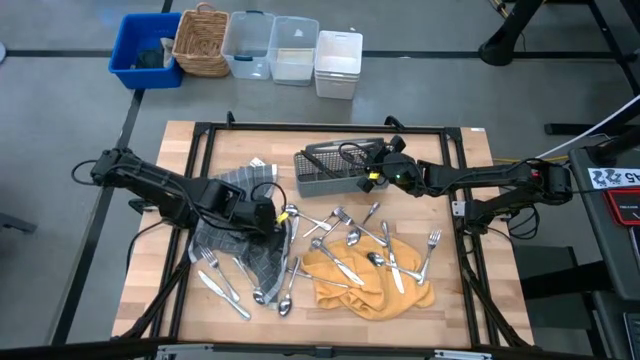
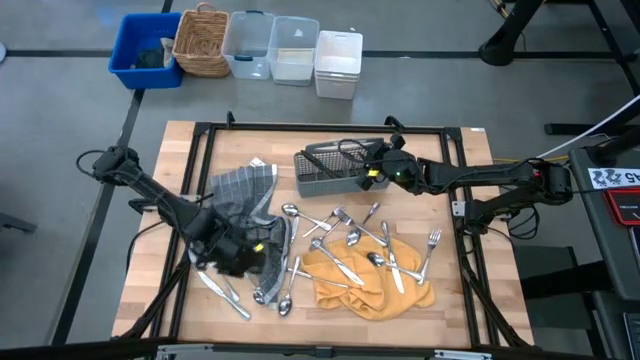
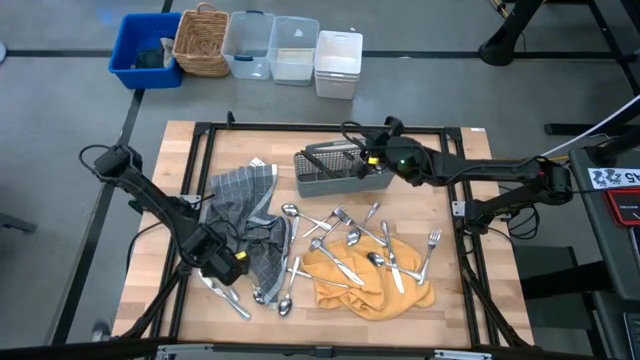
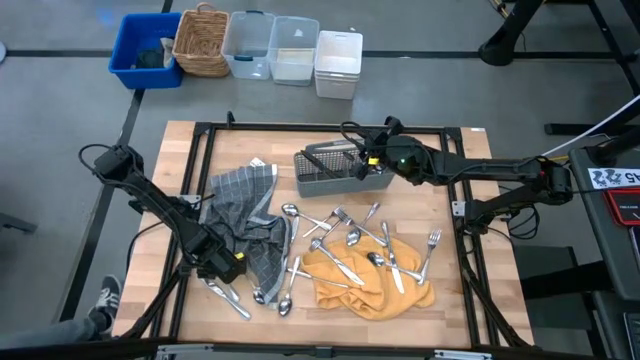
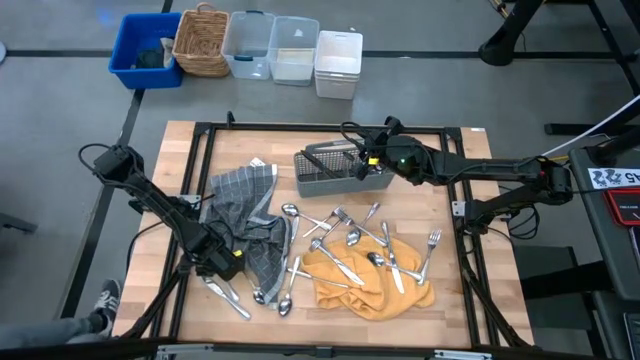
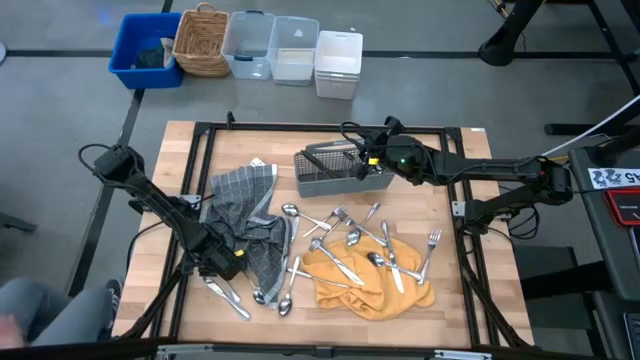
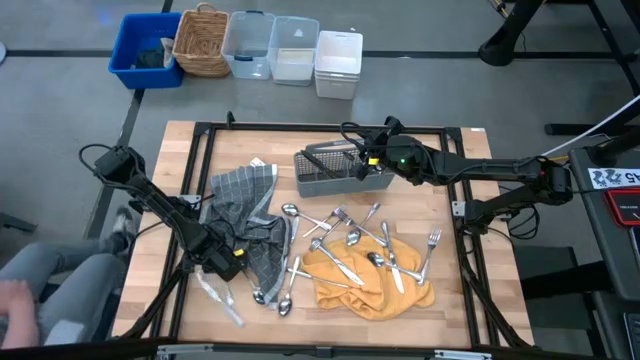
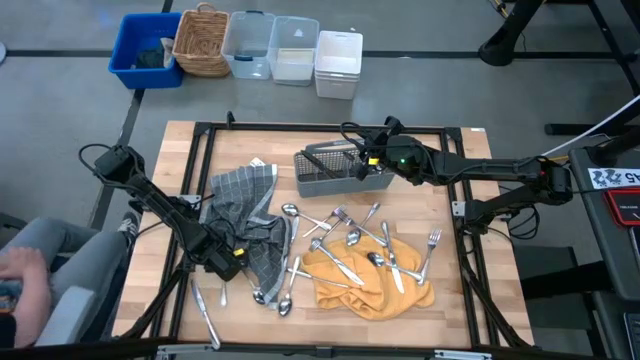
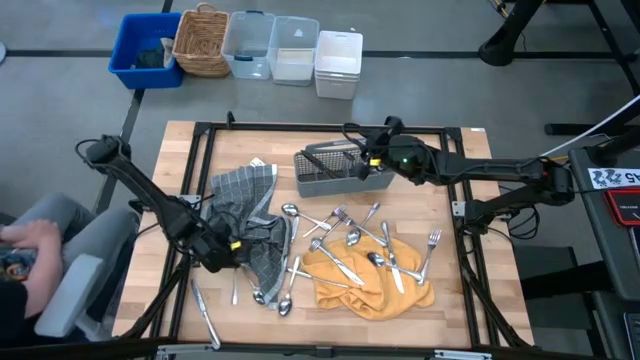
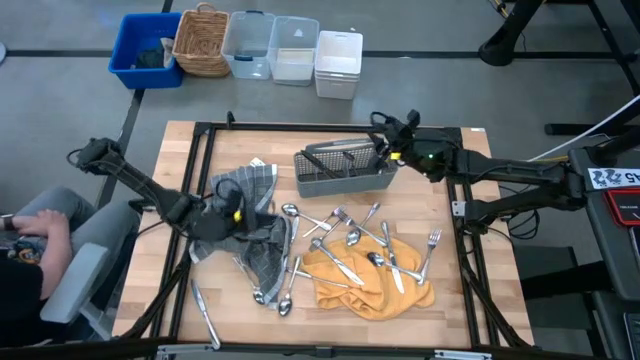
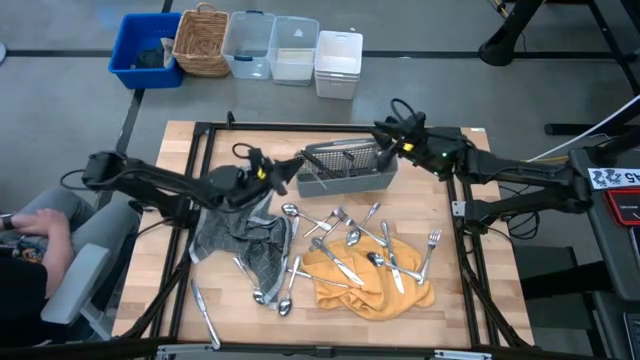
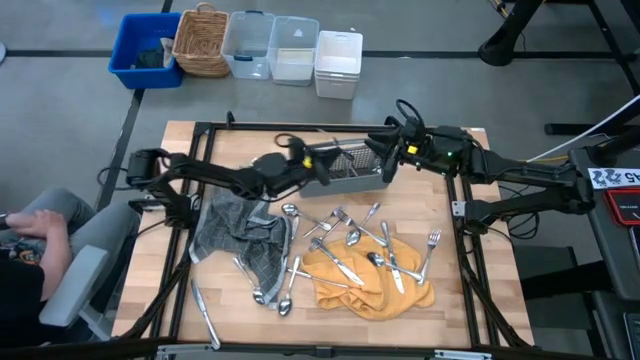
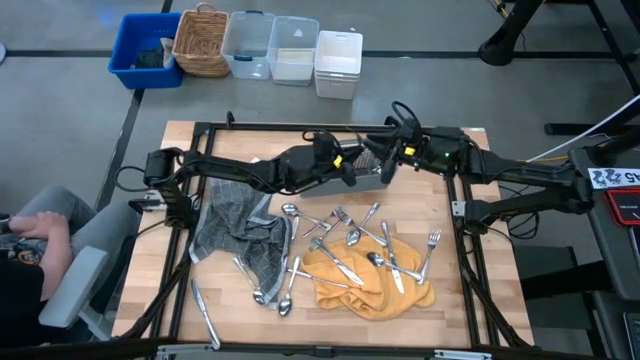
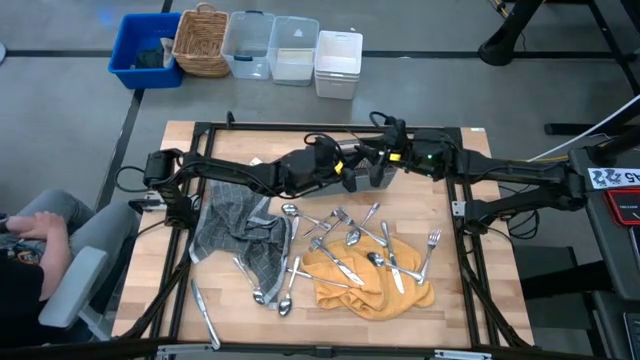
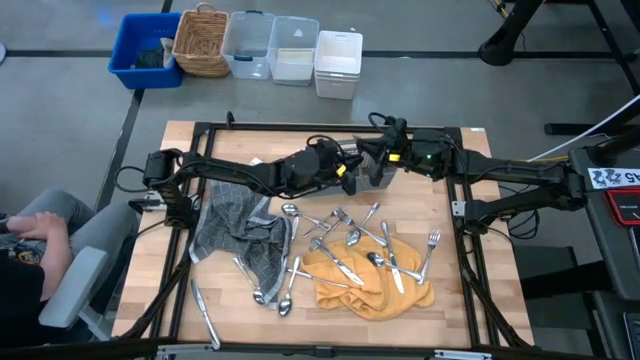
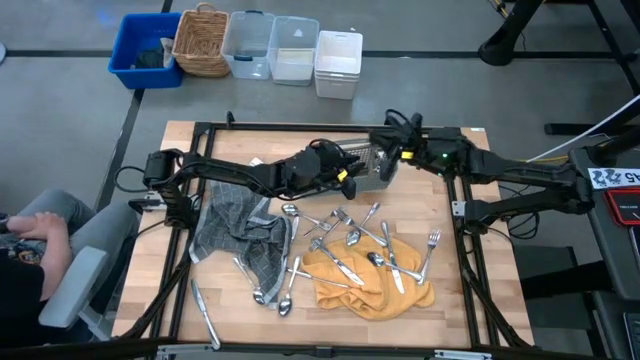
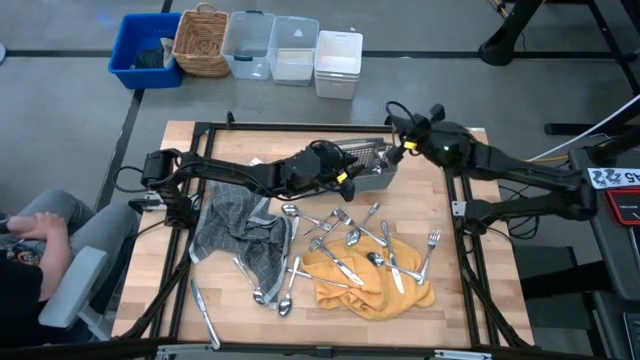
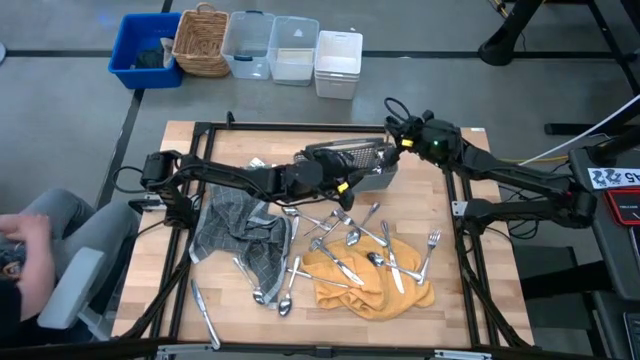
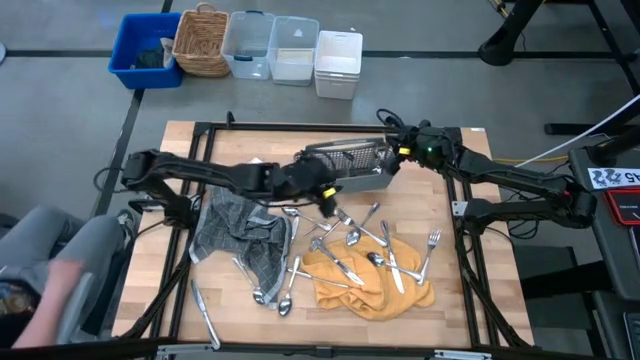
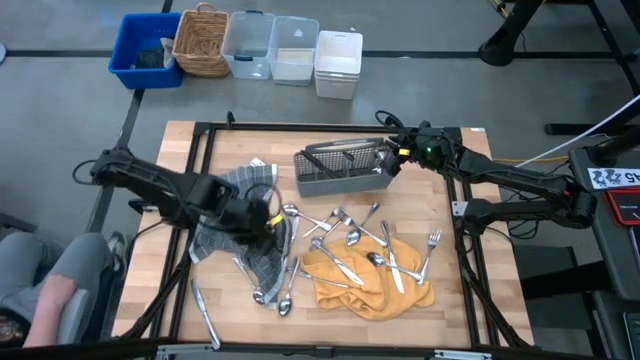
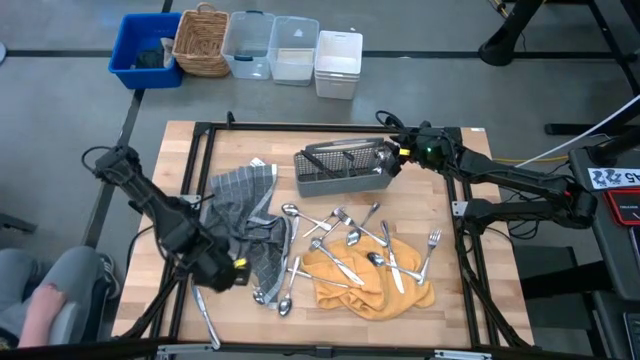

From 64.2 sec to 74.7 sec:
Task: Sort silverware
Put the silver fork into the gray utensil holder

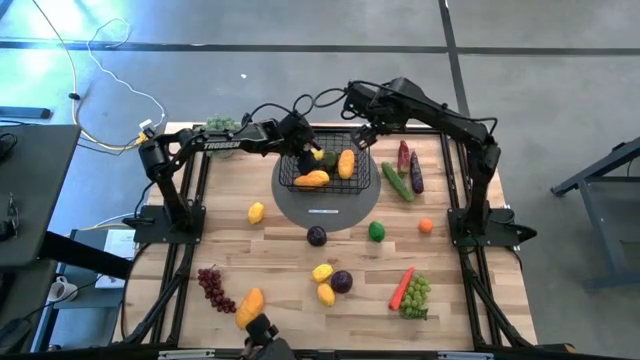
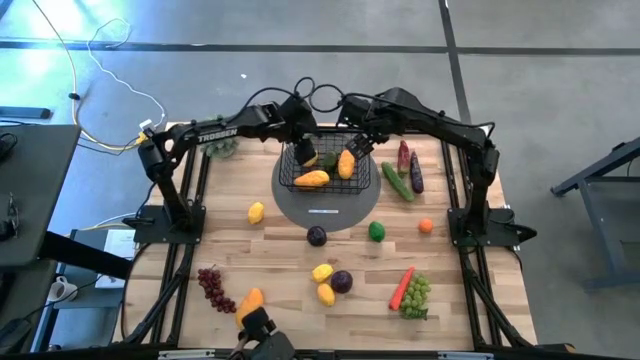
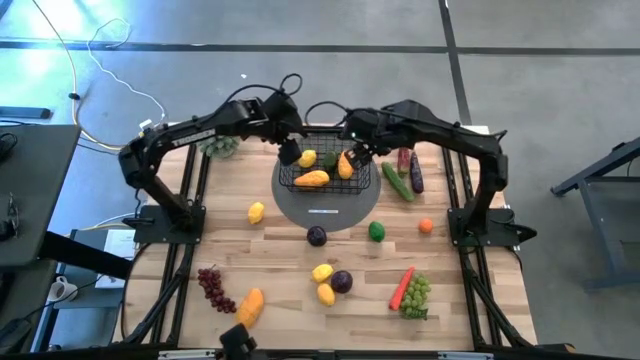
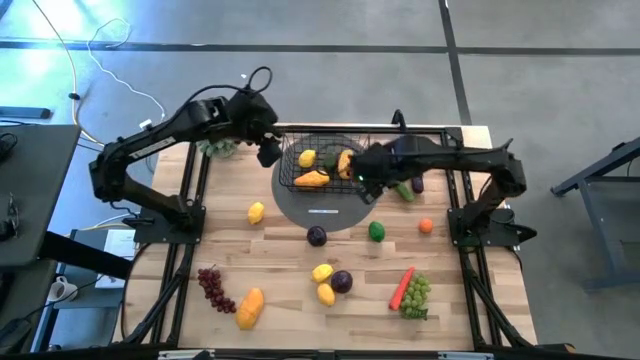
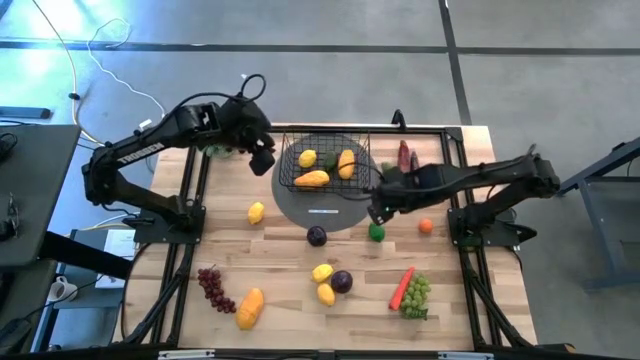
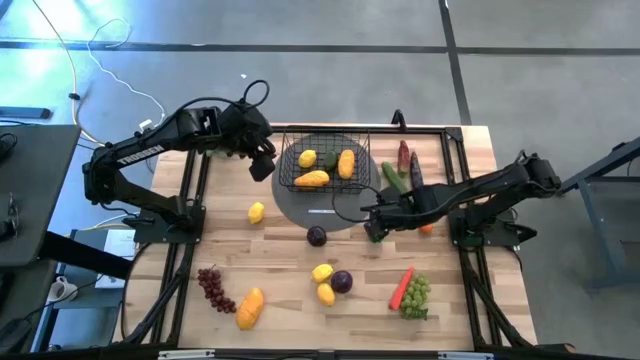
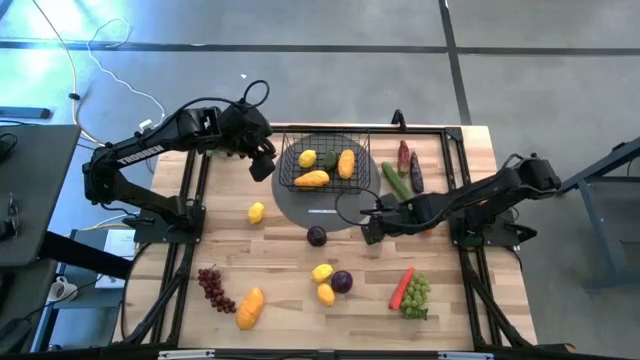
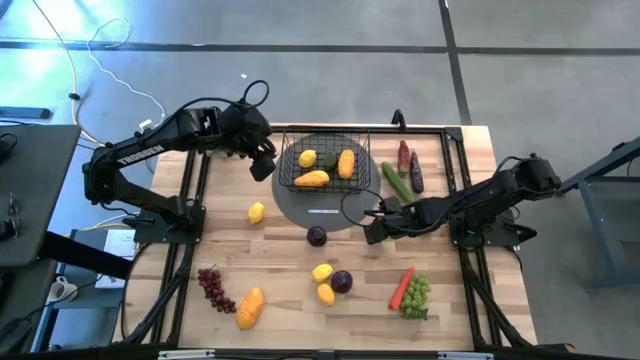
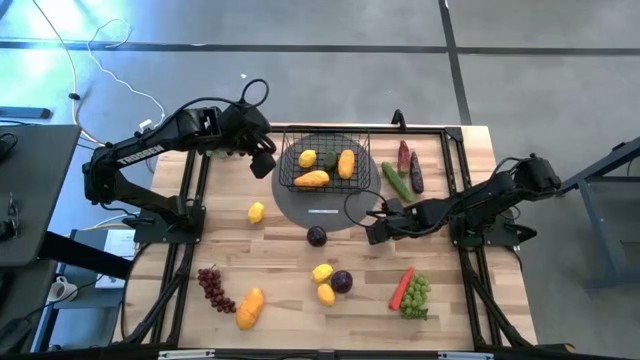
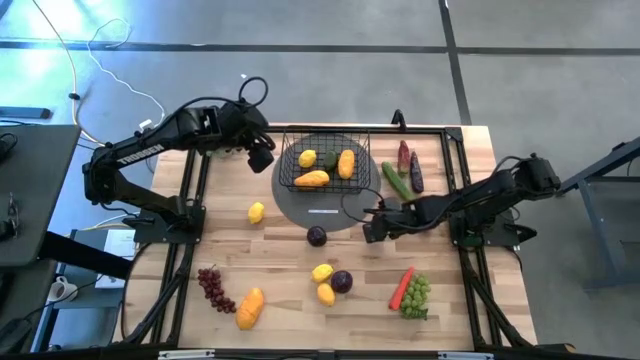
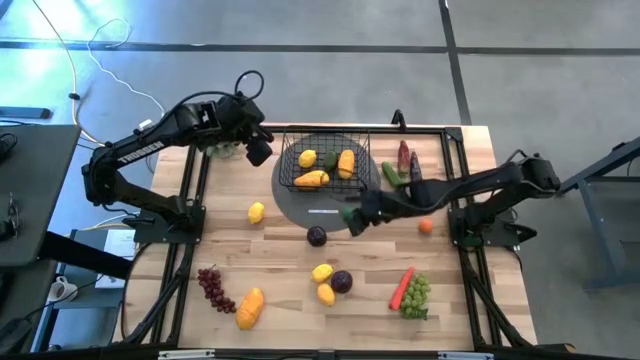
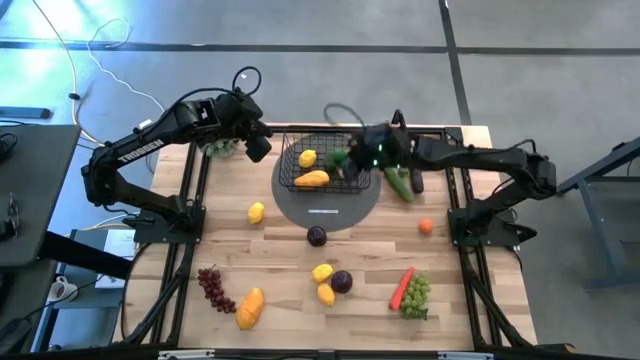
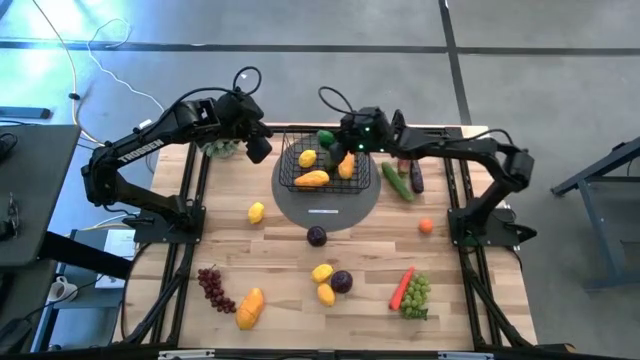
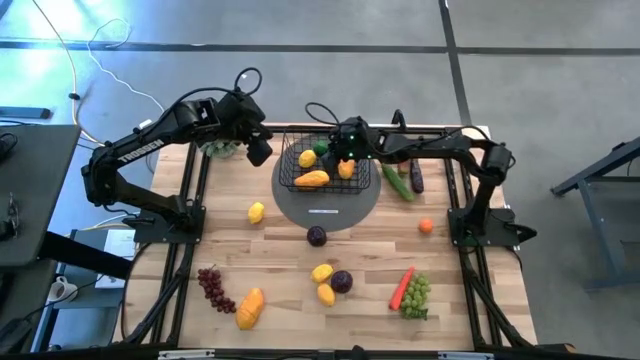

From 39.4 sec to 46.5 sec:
Task: Build produce basket
Put the green lime into the wire basket

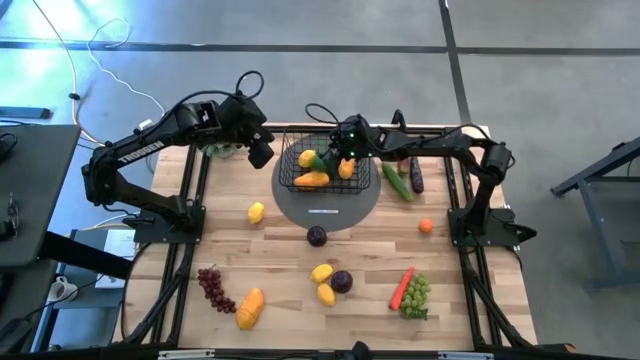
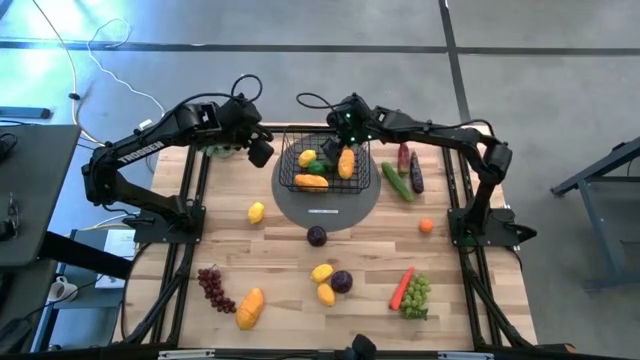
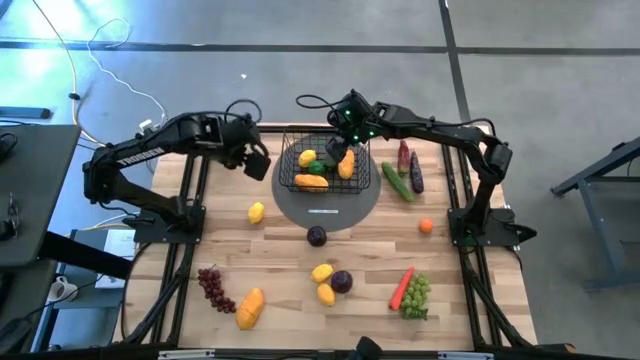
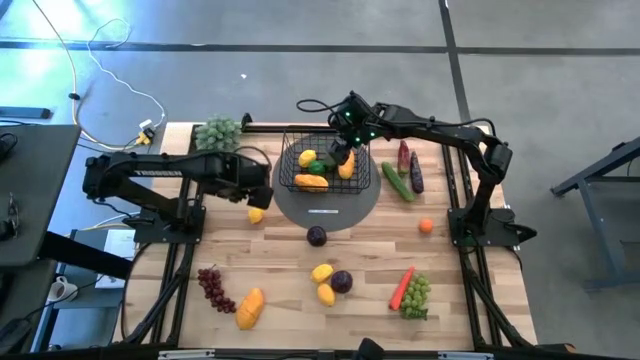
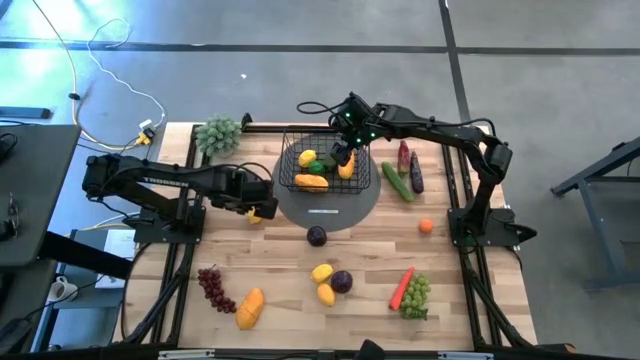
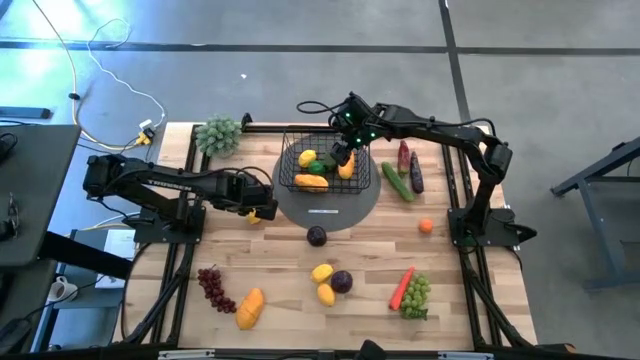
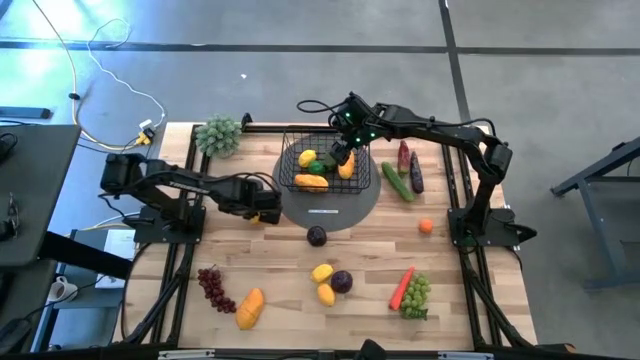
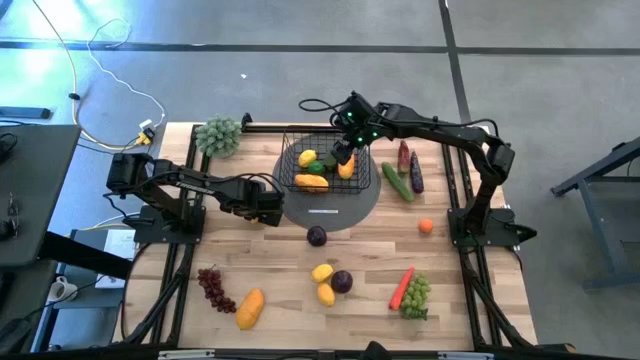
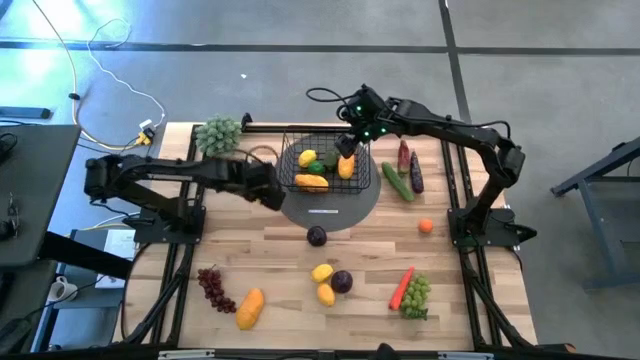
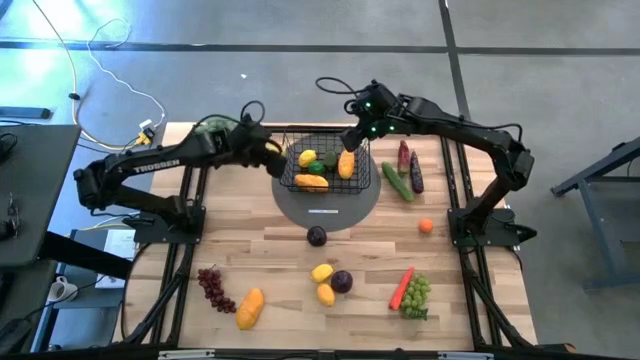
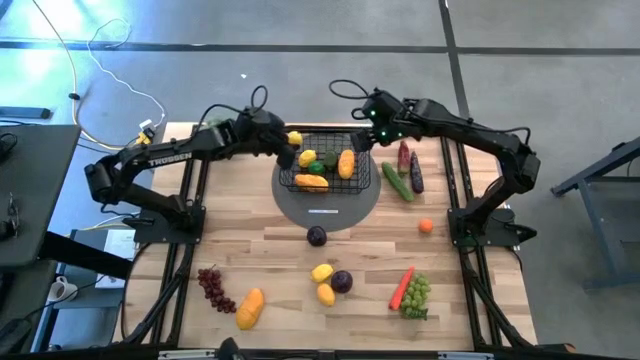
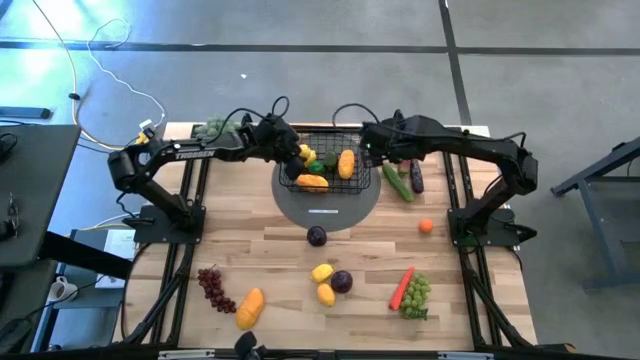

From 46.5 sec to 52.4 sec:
Put the yellow lemon into the wire basket
